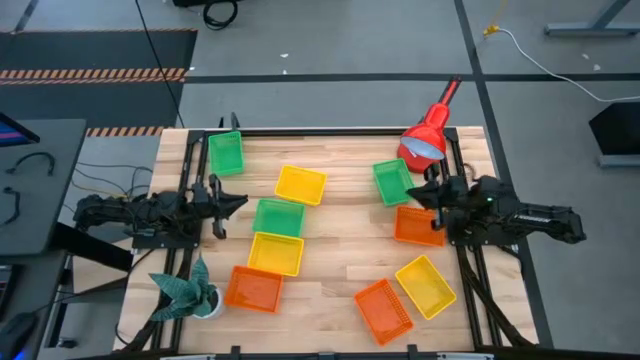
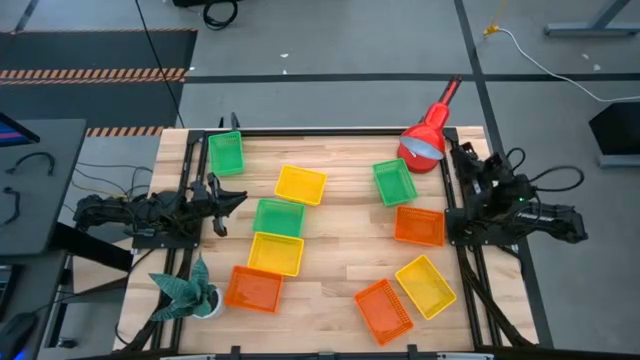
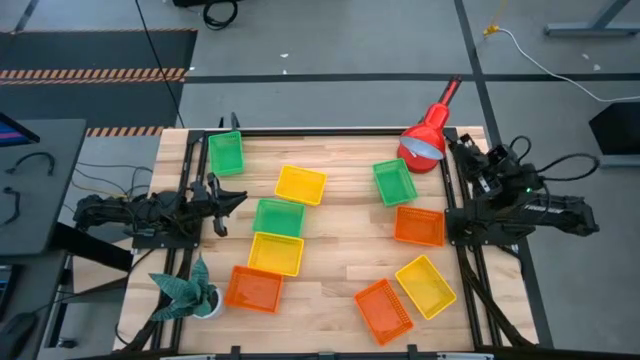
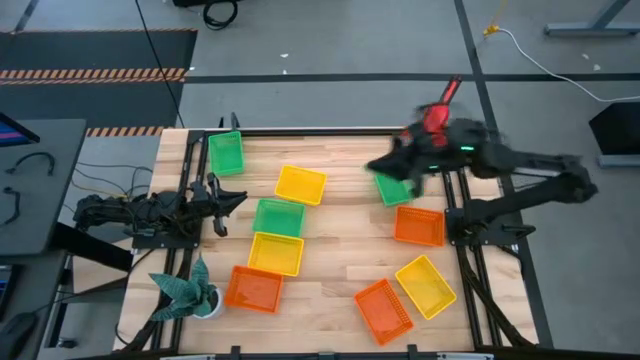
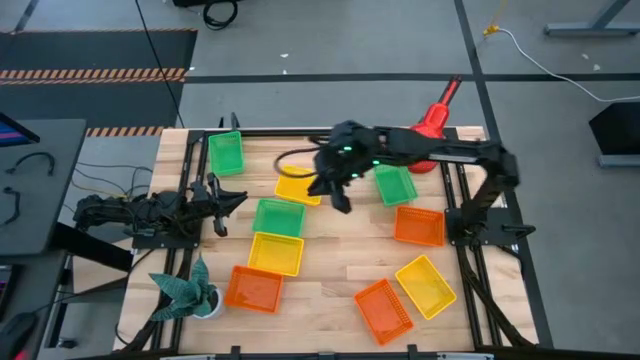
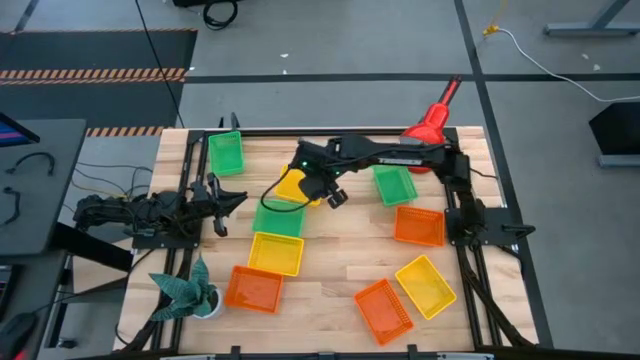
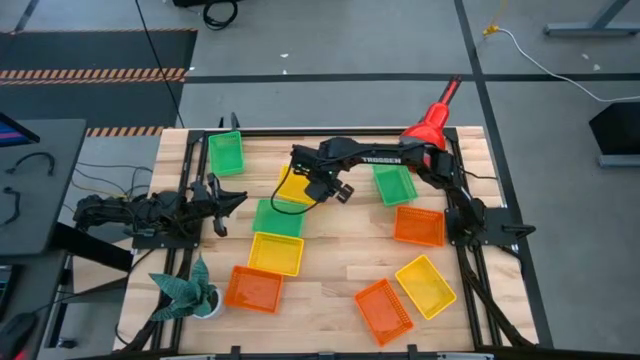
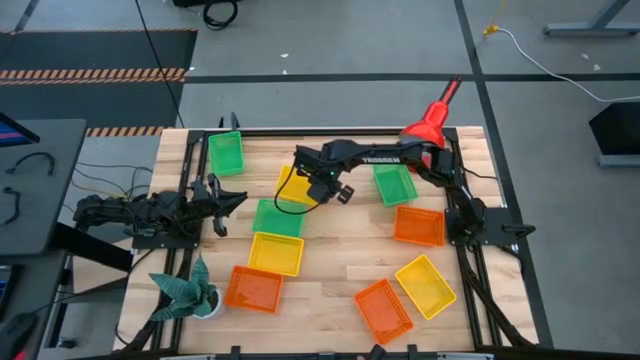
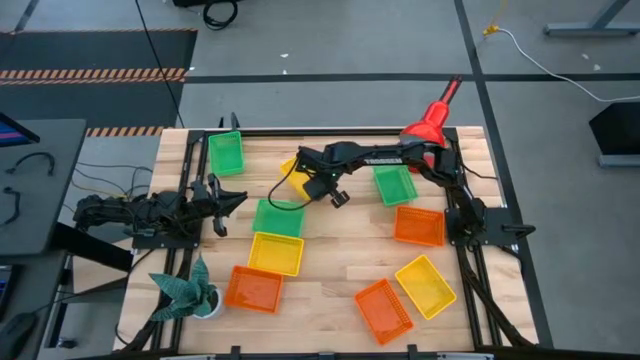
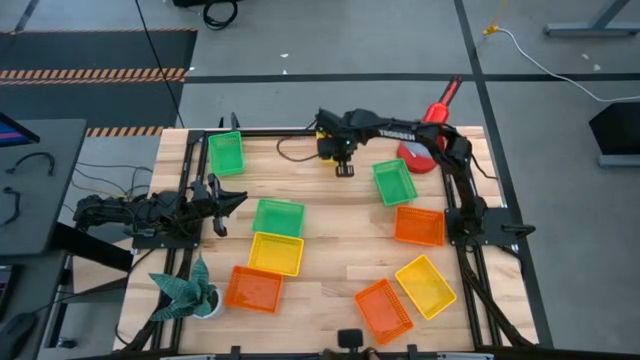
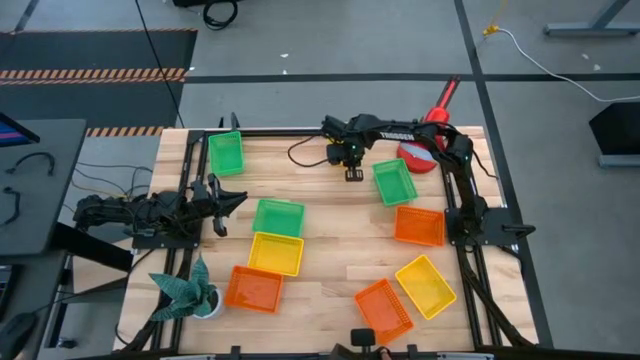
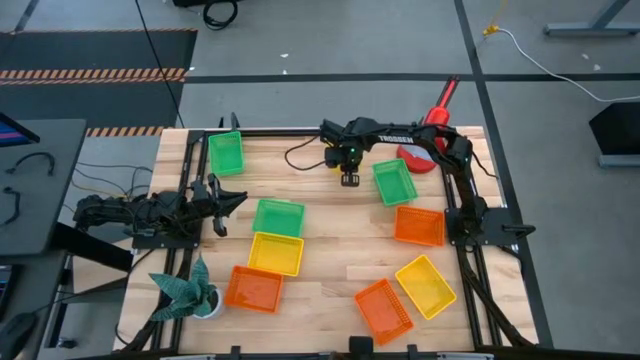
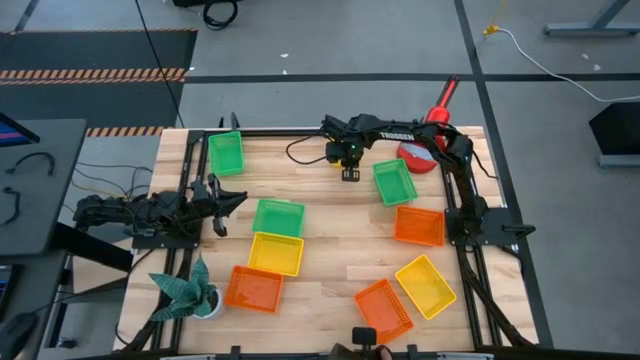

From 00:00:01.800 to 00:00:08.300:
Move the yellow bin to the top center of the table

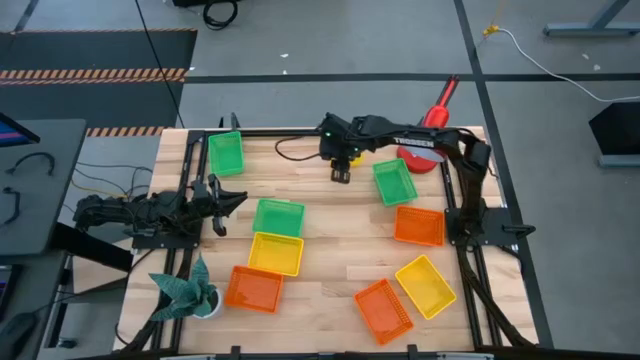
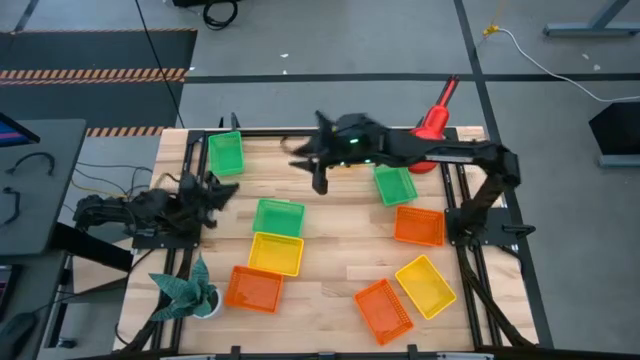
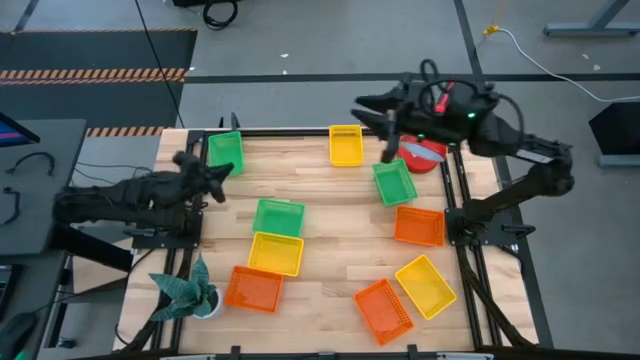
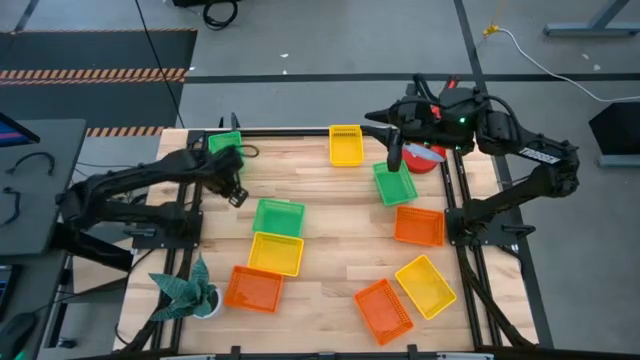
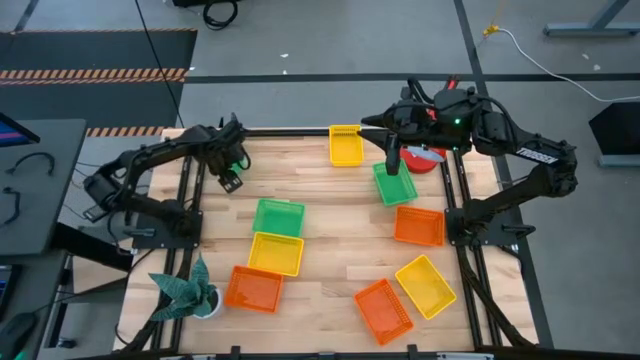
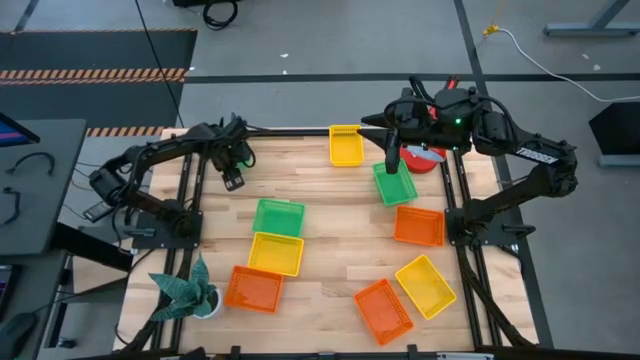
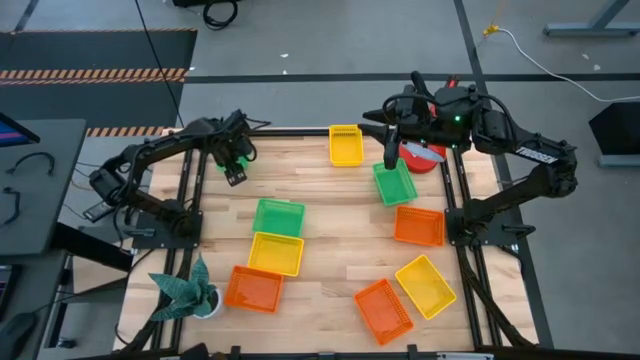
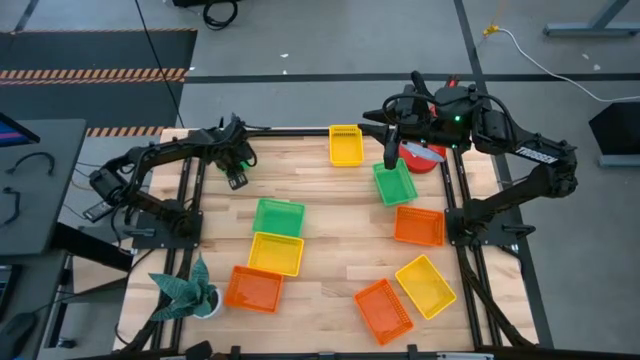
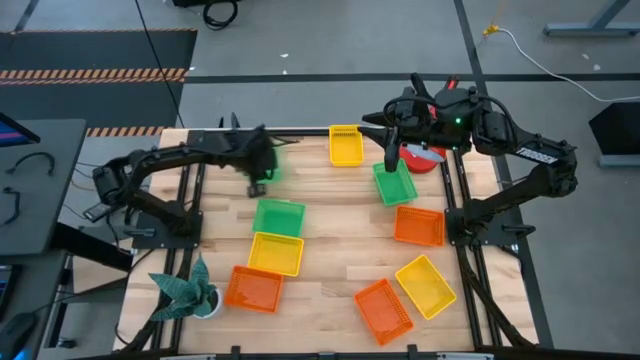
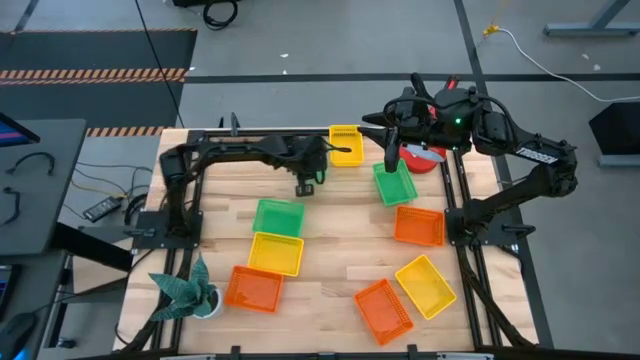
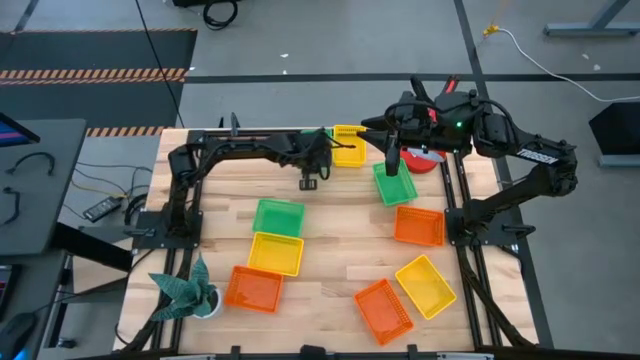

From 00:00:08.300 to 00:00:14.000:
Move the green bin to the top center of the table

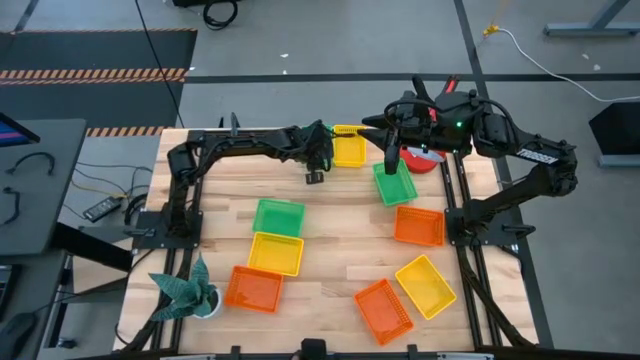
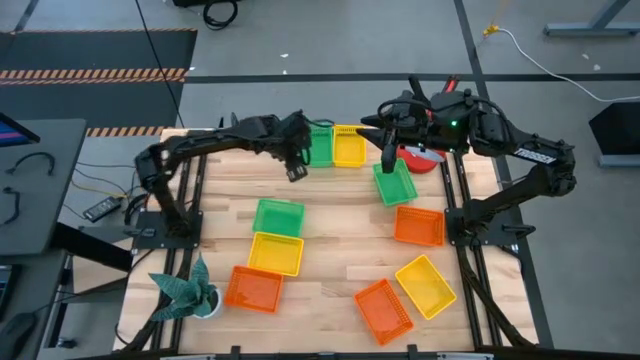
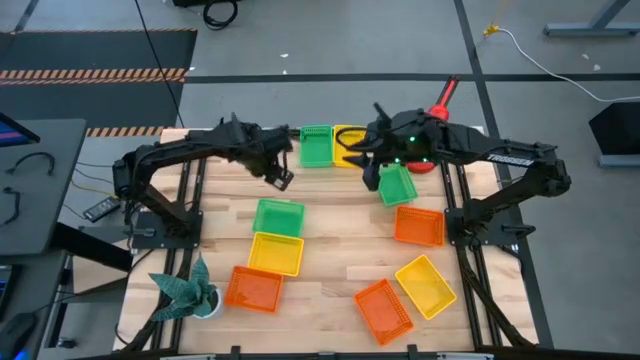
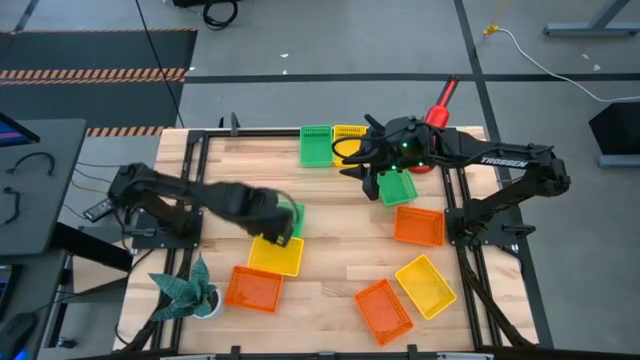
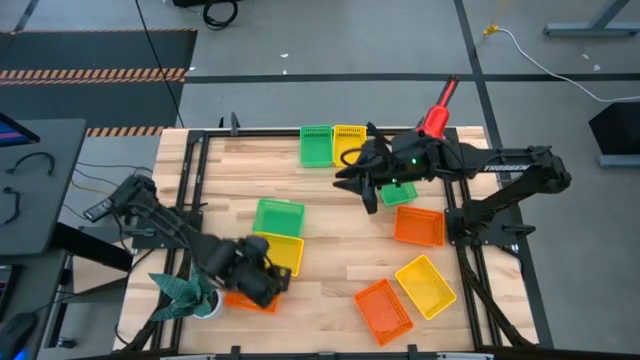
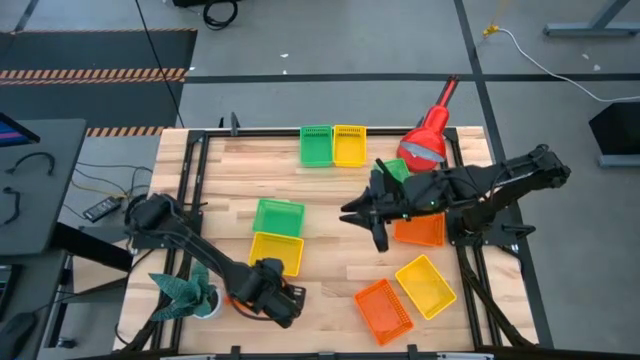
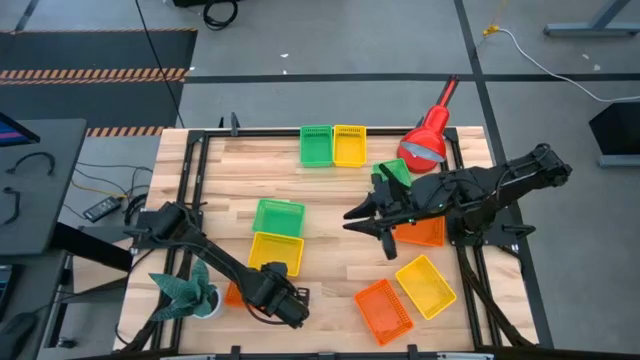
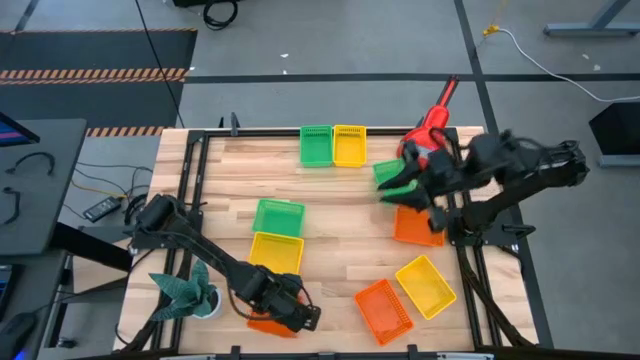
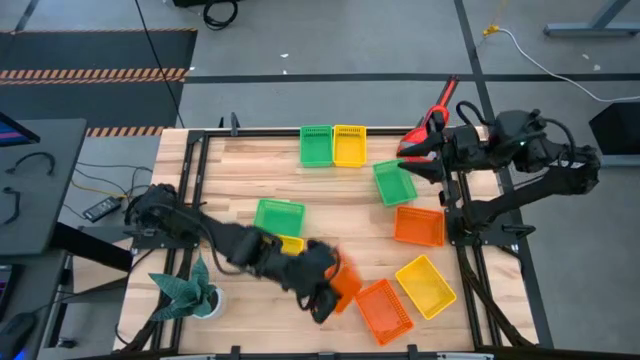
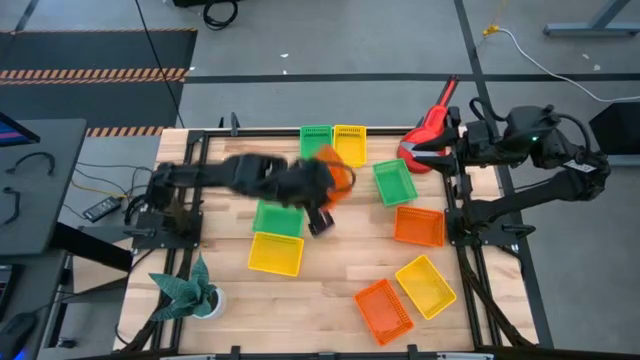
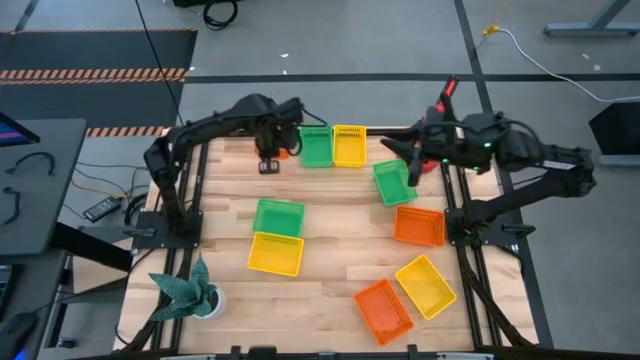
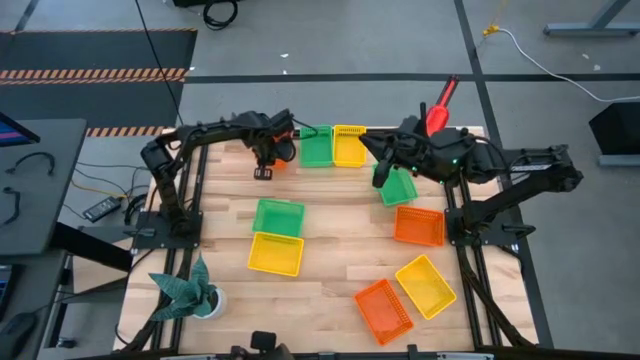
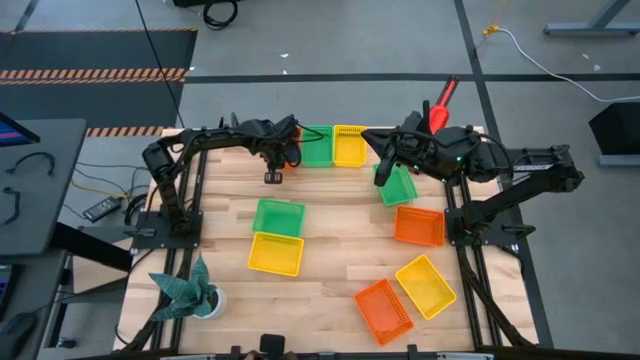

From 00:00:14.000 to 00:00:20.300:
Move the orange bin to the top center of the table
